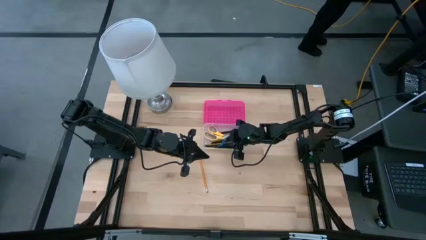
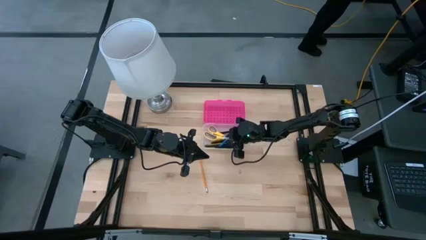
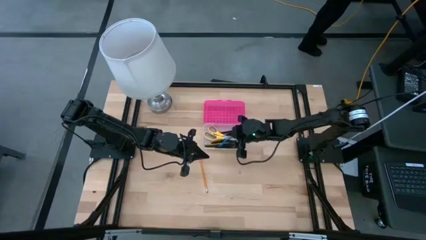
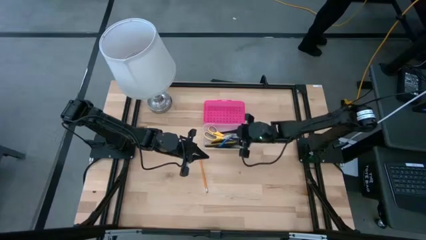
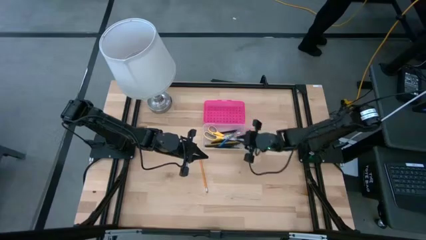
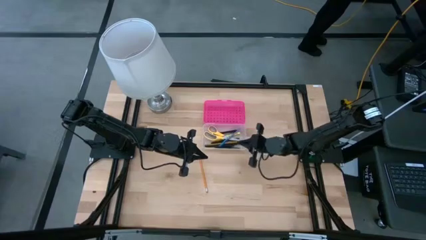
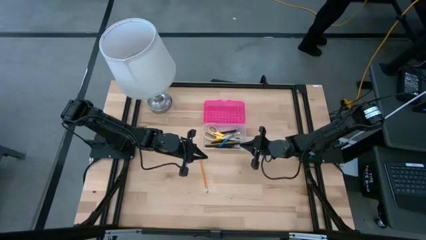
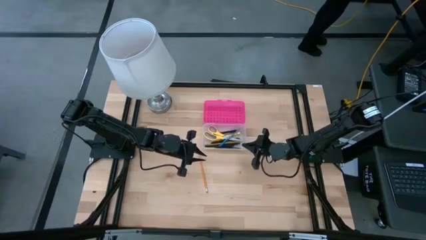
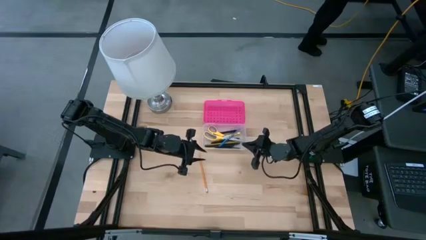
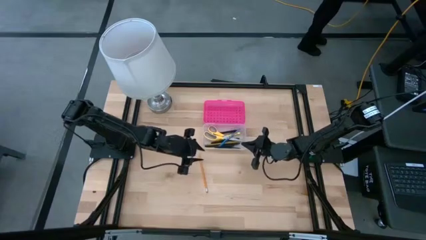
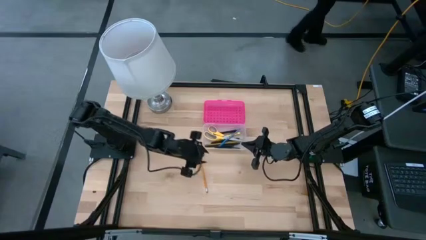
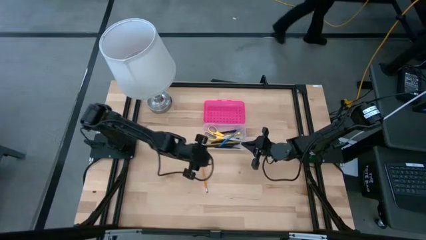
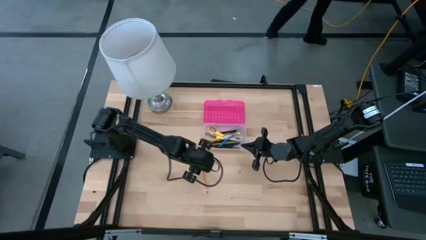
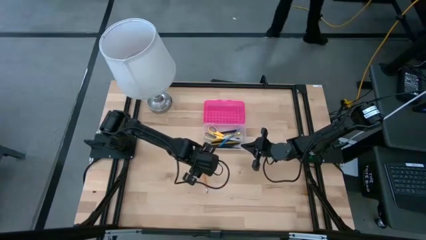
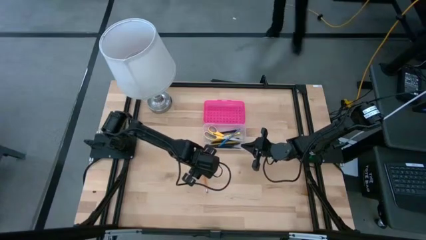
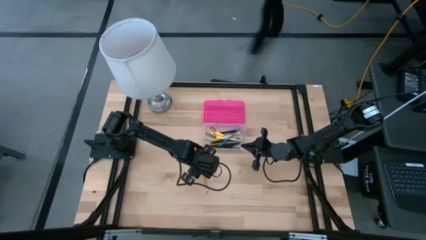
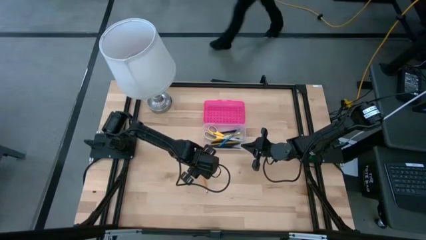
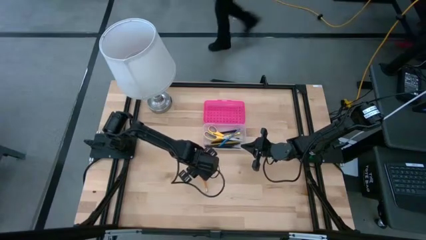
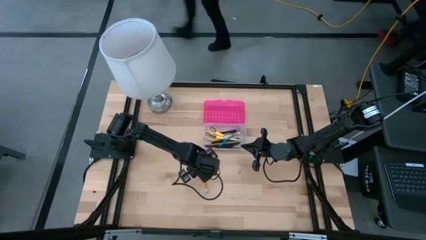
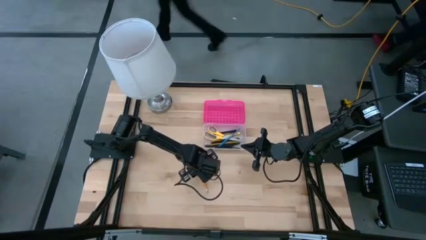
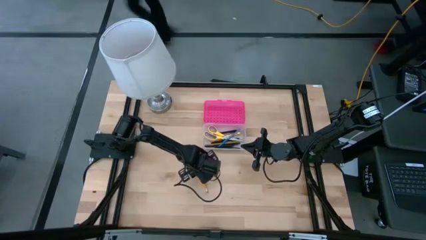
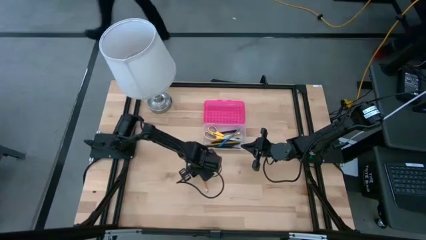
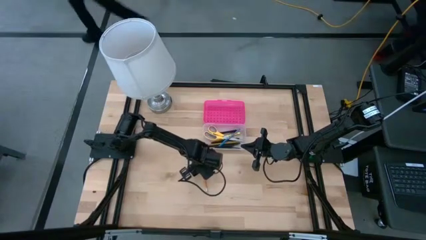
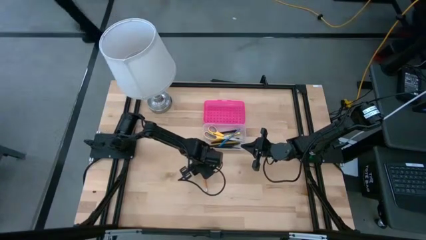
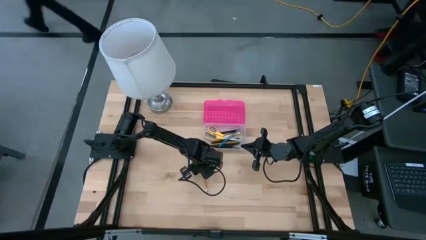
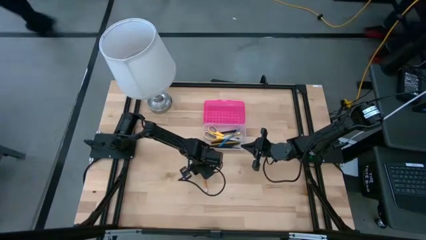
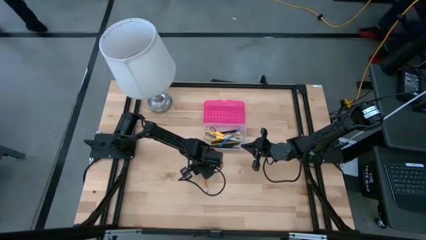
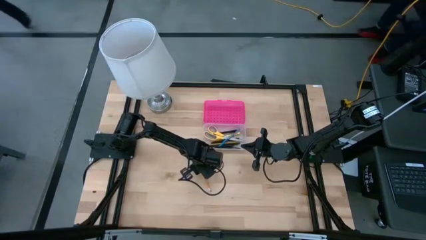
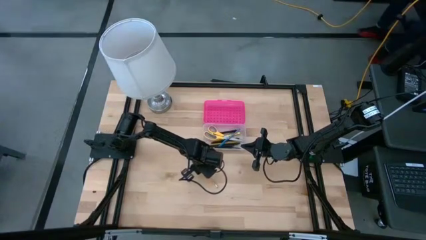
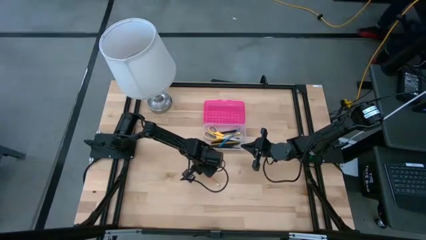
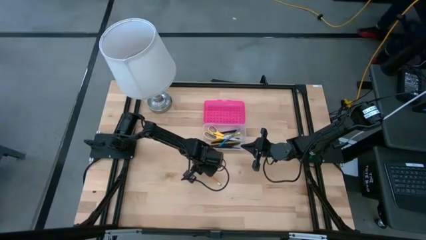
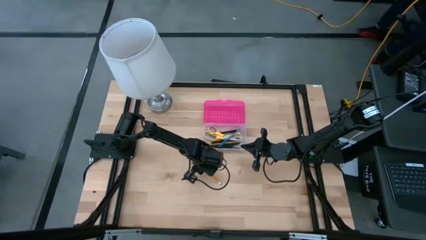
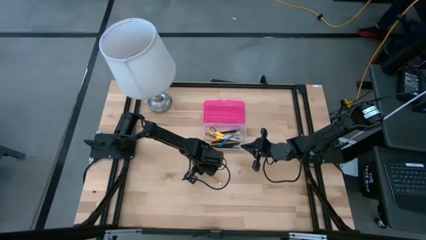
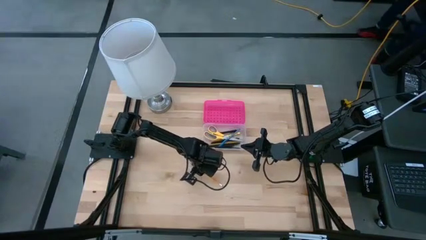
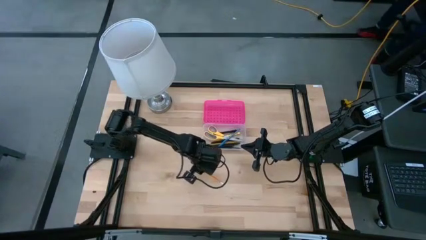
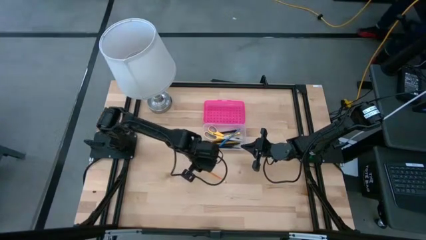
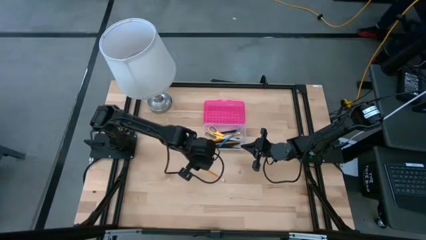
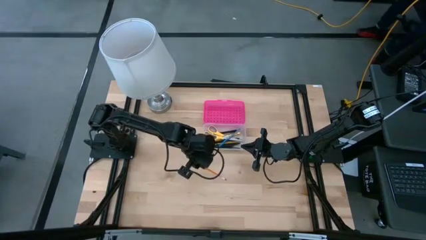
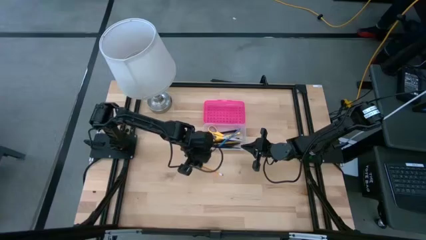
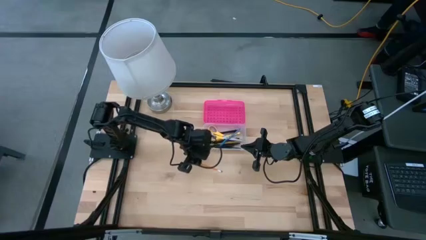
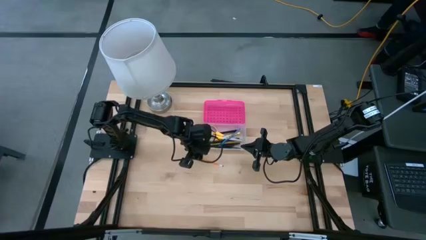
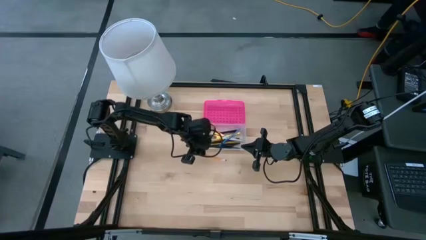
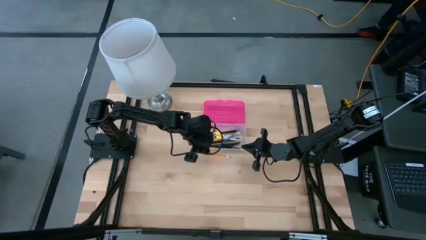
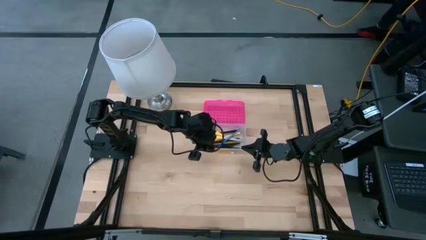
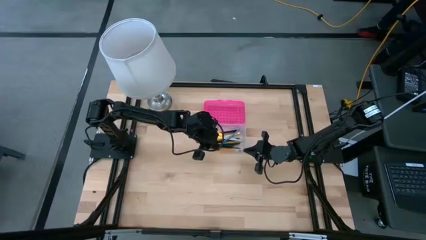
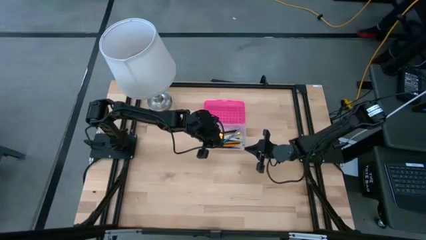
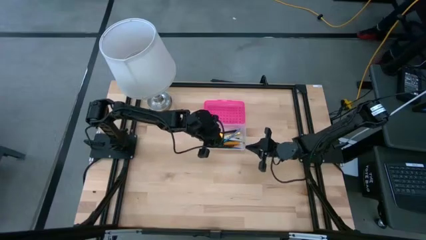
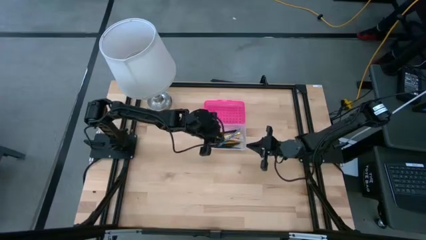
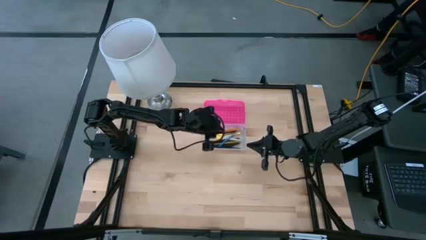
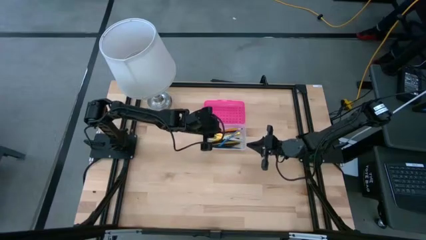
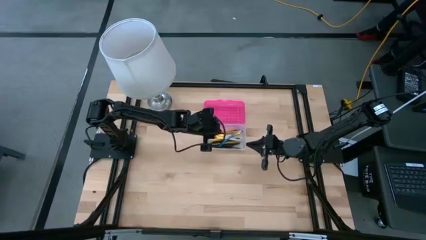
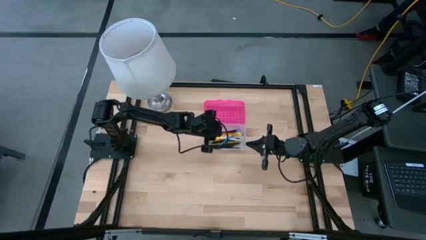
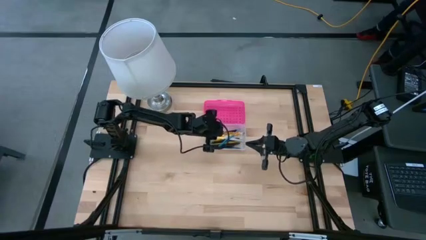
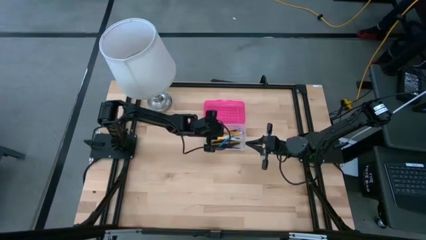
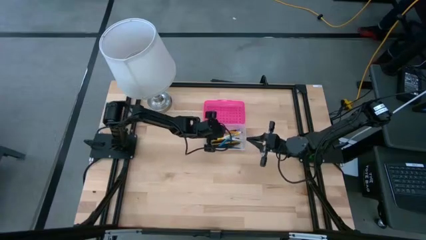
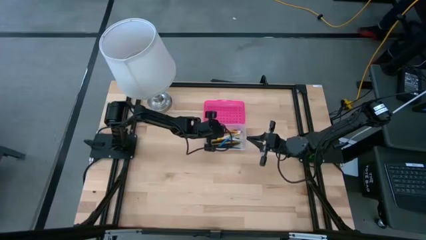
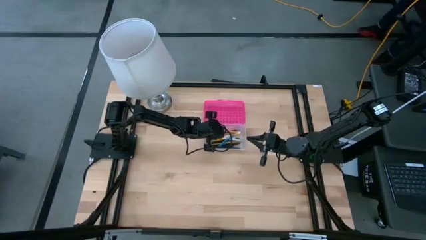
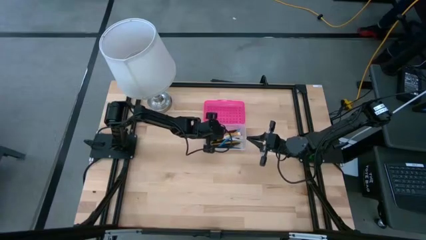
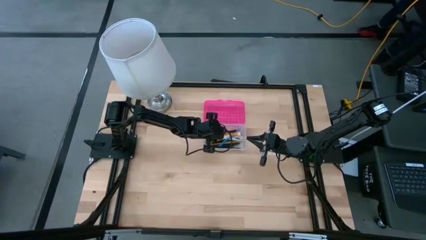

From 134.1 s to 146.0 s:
Task: Pick & place school supplies into a supply box
Put the orange pencil into the pink supply box

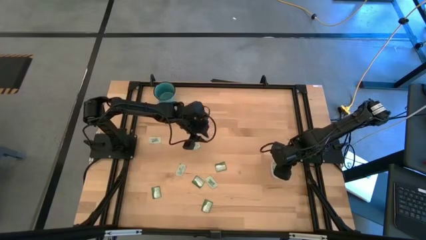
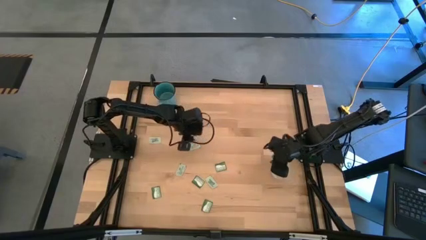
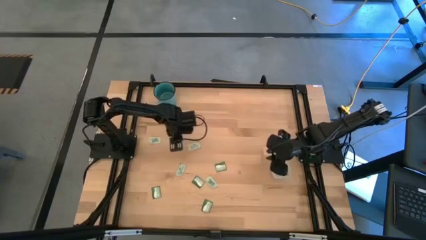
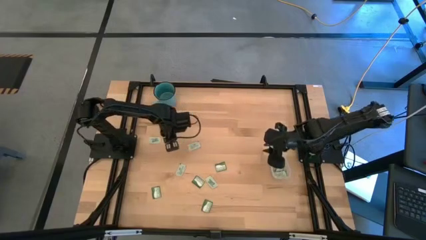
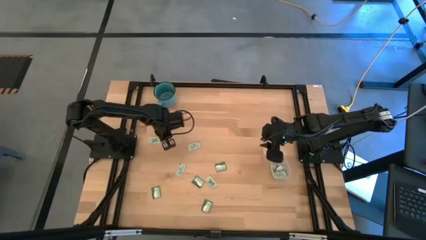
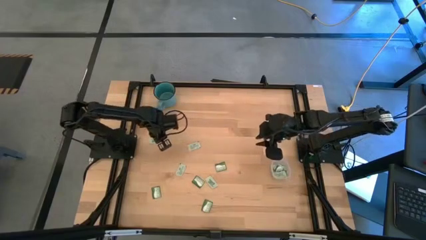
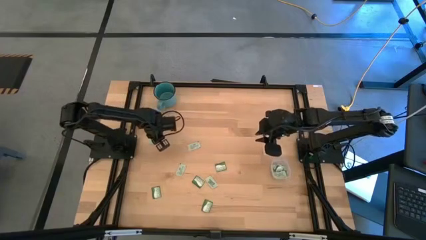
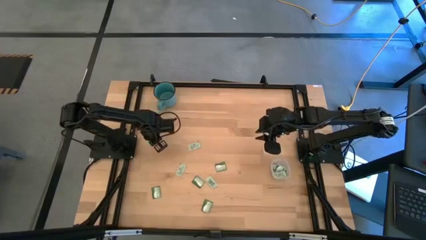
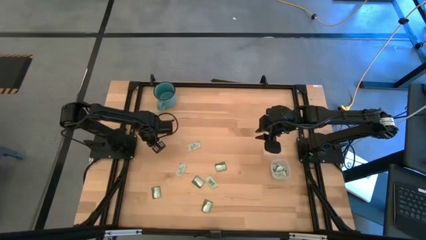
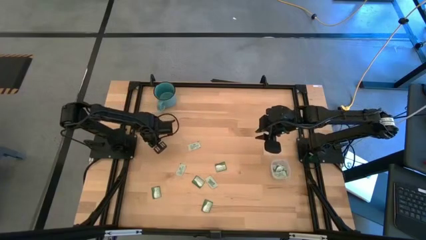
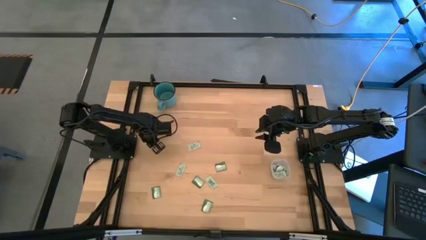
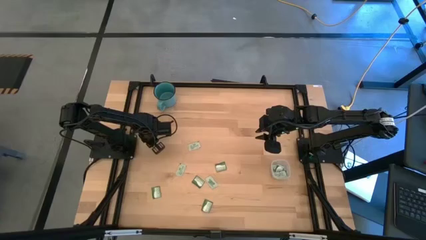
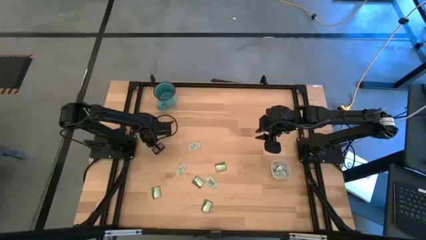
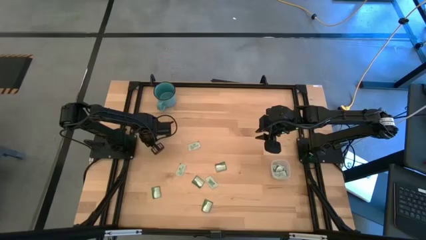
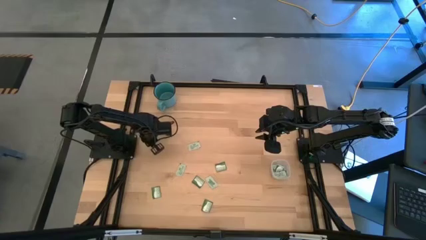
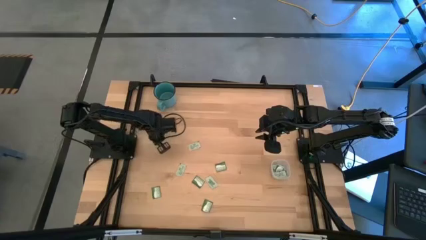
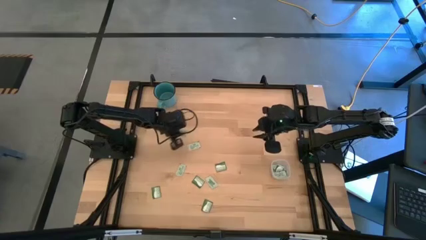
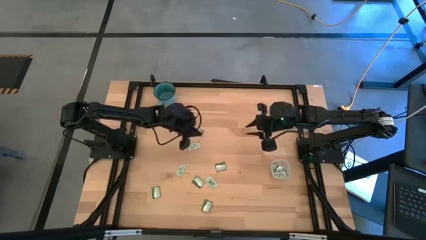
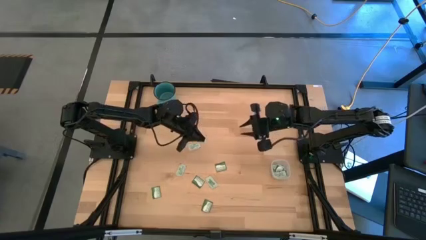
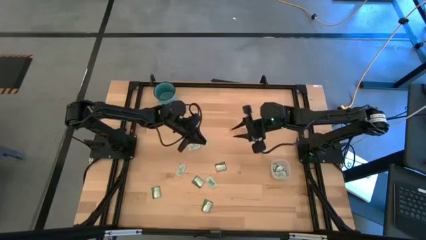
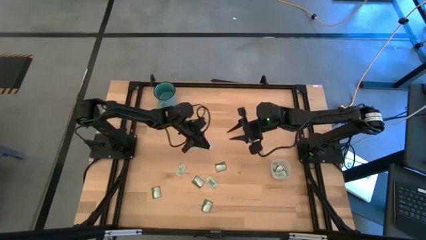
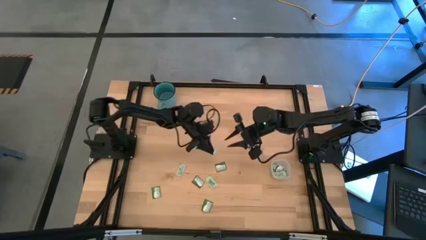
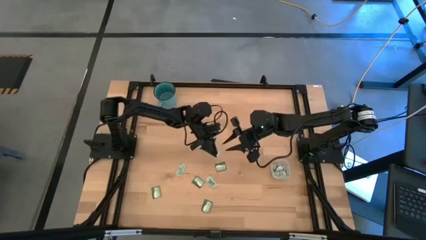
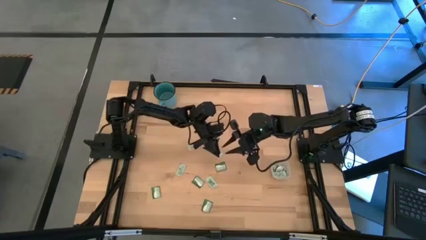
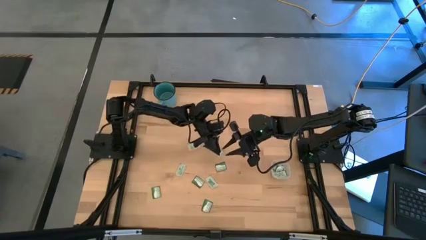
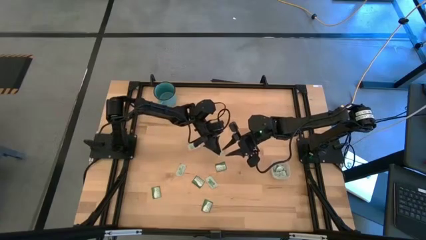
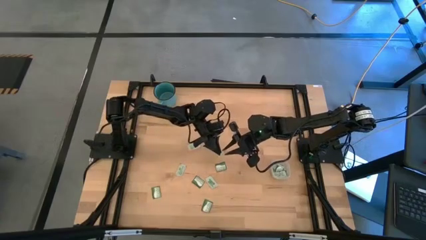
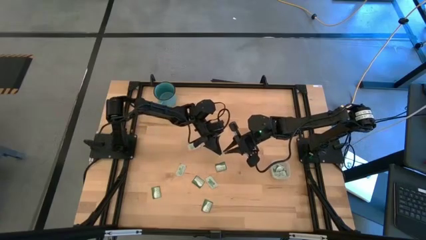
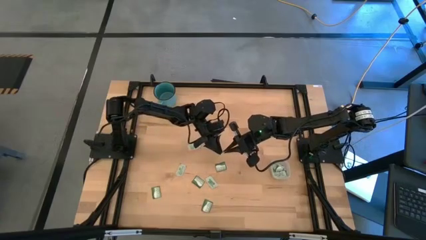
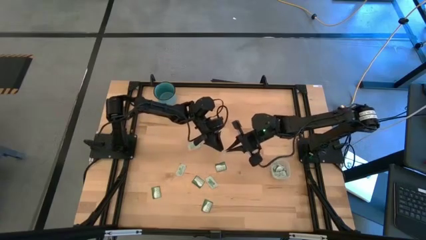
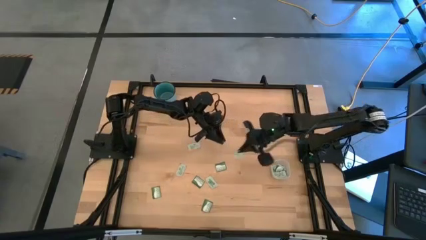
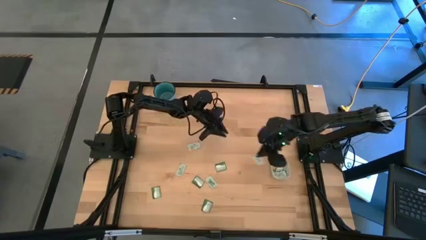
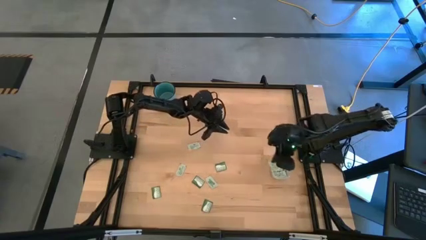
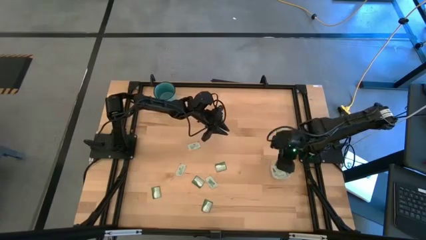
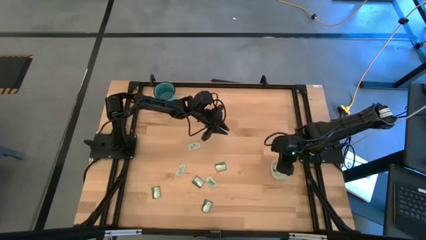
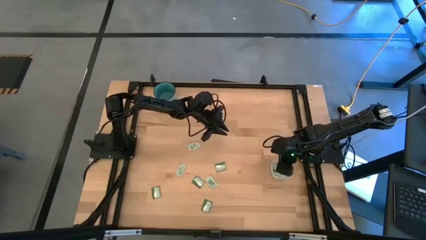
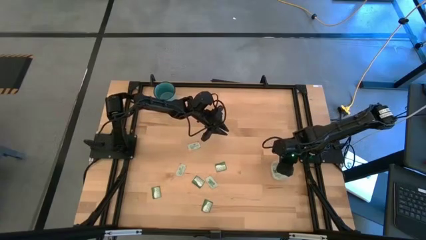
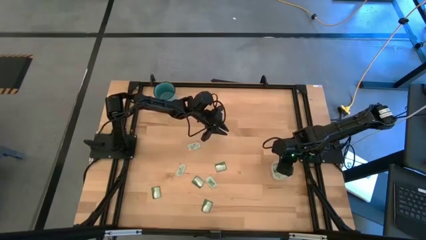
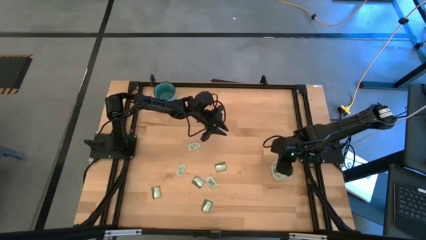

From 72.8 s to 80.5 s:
Task: Pick and place items into bin
Put the white stevia packet into the transparent bin
